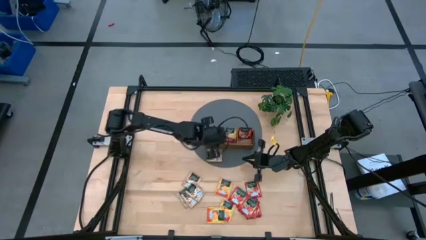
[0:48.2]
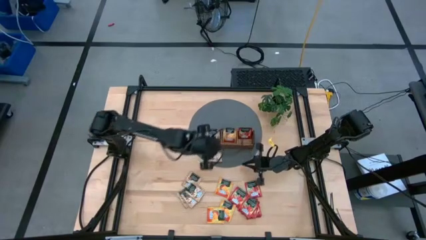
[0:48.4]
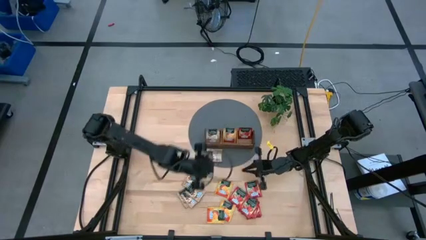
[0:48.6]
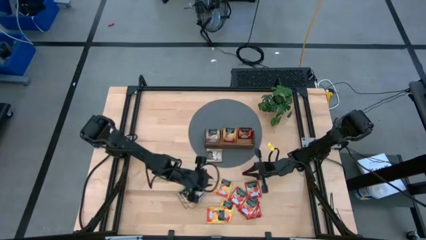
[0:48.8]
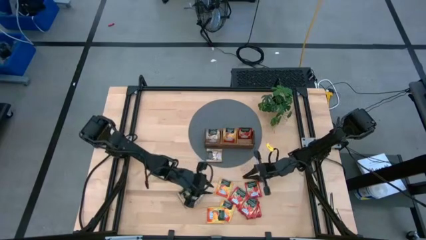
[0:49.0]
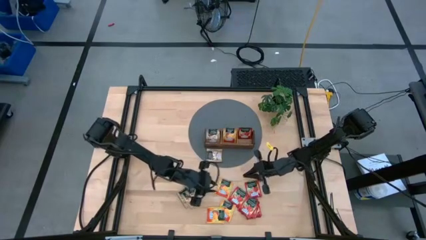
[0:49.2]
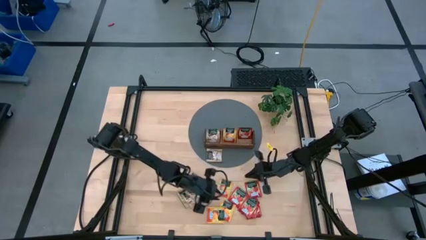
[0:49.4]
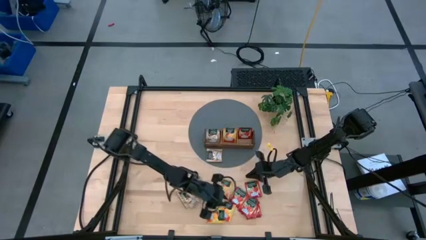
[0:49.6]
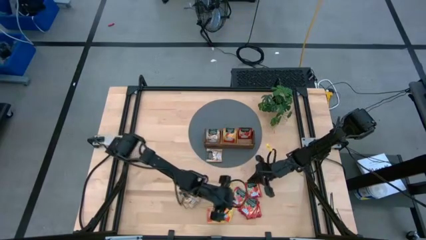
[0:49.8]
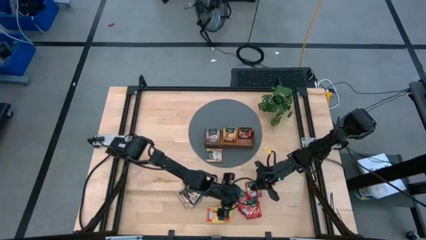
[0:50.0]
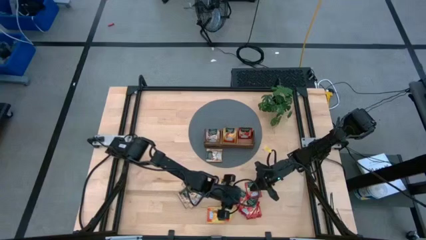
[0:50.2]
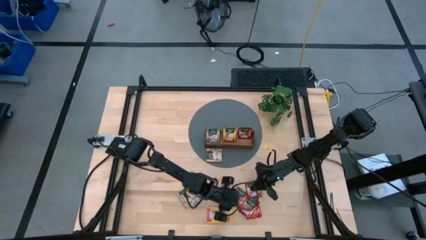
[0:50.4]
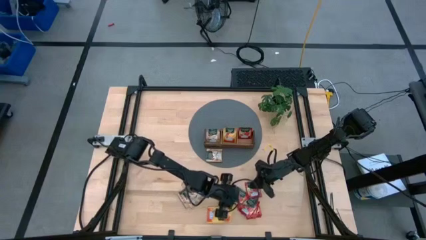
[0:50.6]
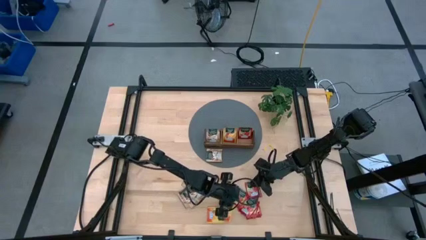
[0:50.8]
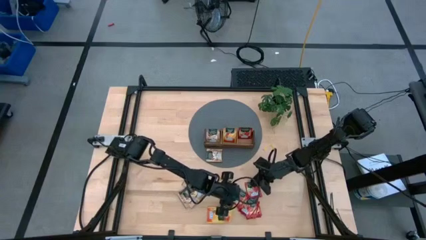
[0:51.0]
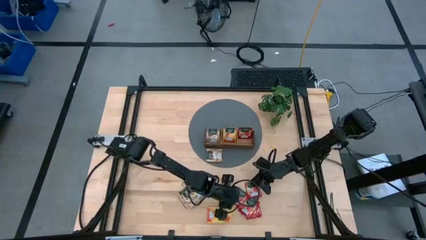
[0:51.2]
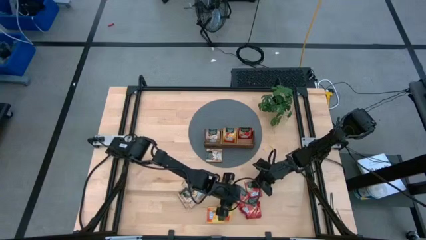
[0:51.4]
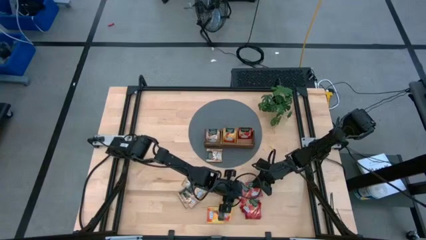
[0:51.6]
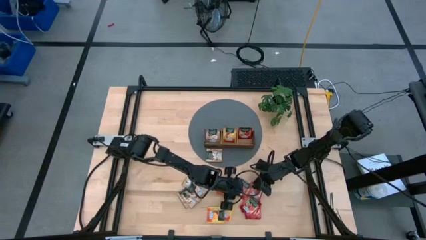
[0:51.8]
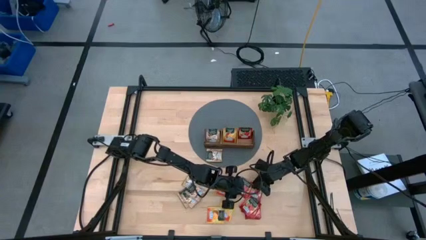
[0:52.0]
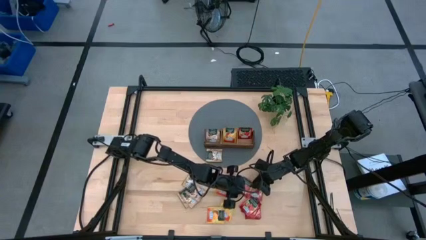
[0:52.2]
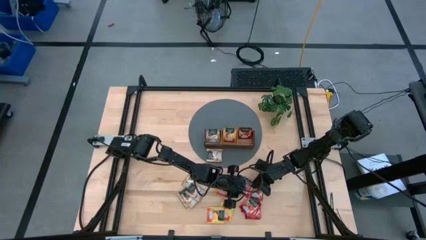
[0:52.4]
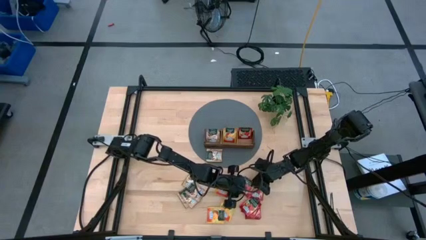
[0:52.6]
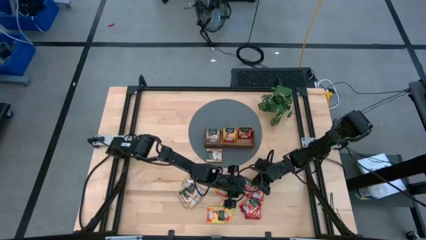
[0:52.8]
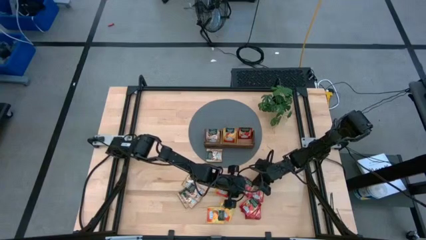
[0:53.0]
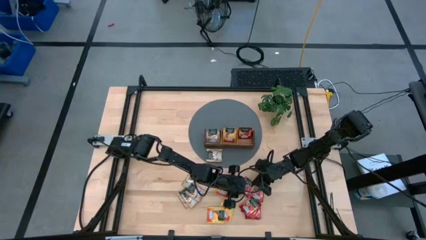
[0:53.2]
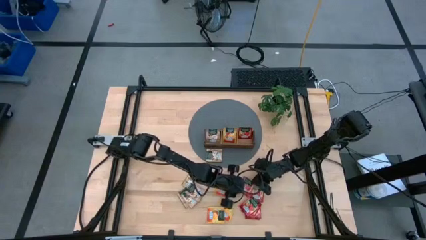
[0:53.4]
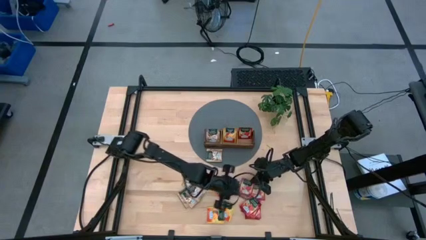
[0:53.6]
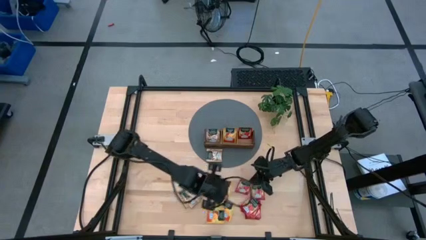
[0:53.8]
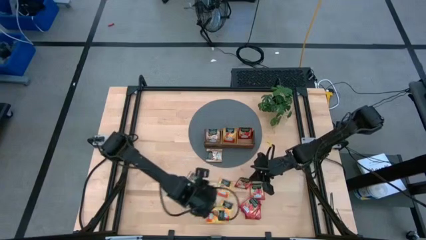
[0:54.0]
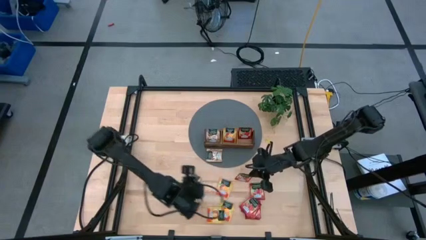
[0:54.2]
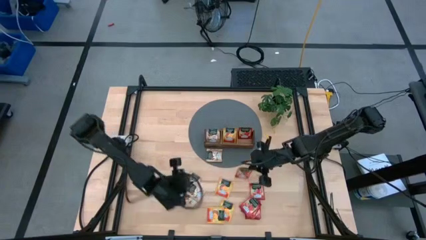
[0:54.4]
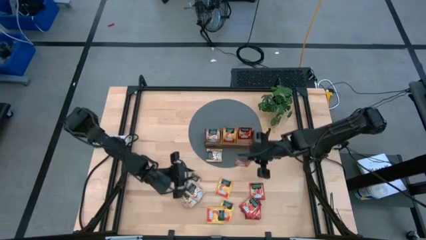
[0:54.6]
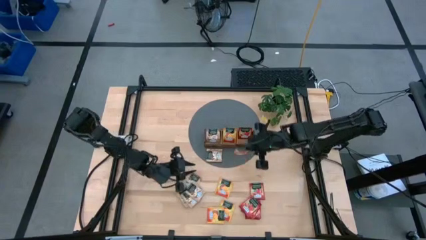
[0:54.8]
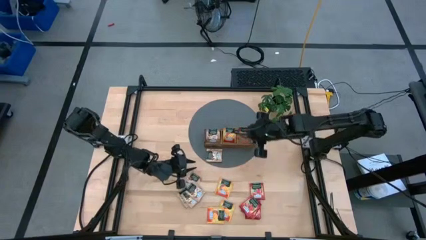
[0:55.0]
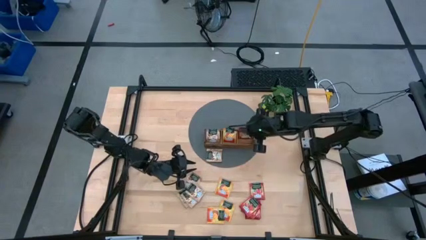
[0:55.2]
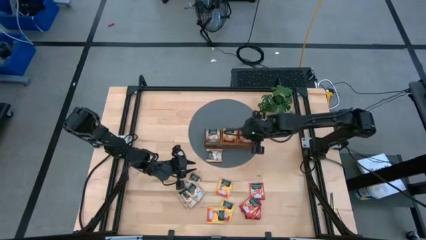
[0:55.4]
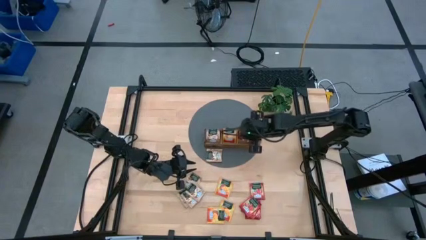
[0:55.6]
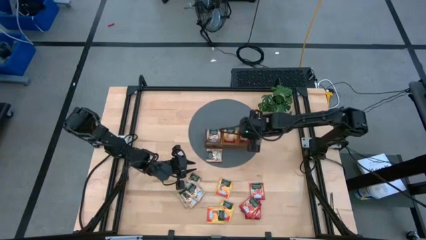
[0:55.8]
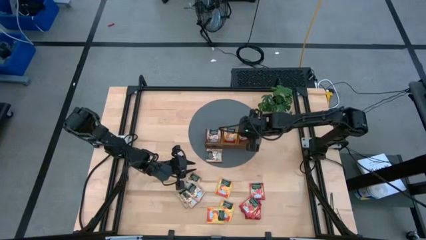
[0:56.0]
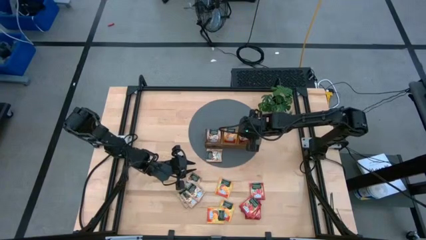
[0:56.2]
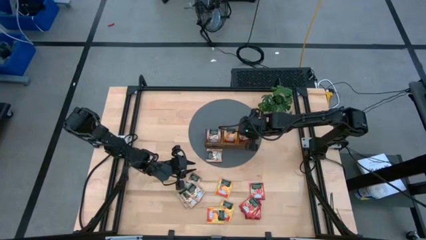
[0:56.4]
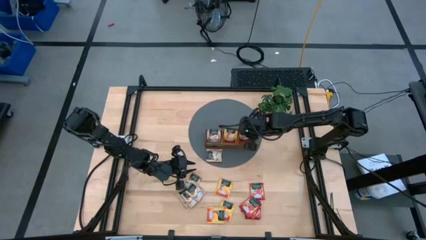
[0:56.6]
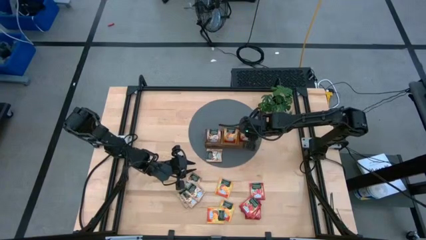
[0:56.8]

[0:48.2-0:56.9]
Task: Pick & Place Tea
Put the red tea packet into the right section of the wooden organizer

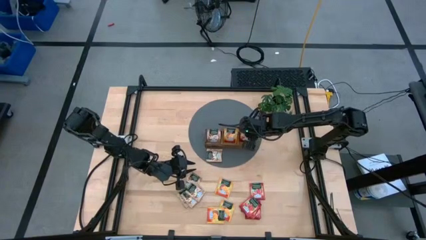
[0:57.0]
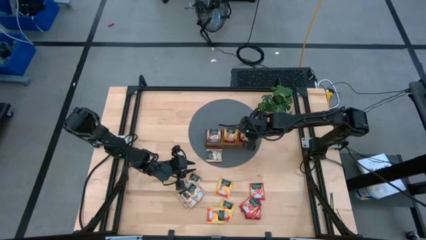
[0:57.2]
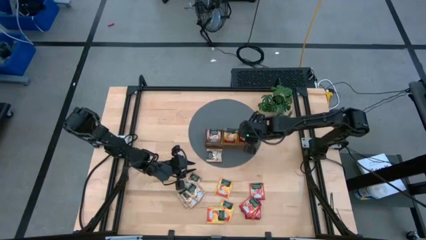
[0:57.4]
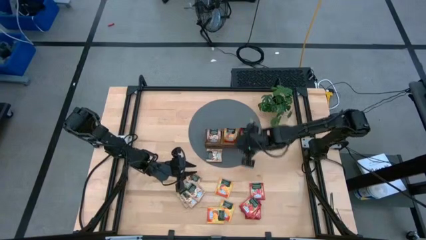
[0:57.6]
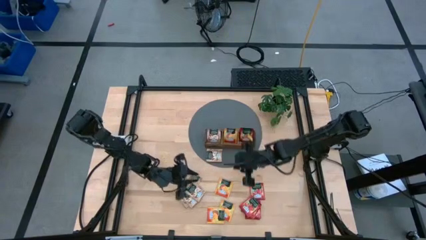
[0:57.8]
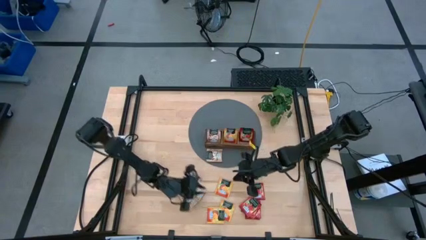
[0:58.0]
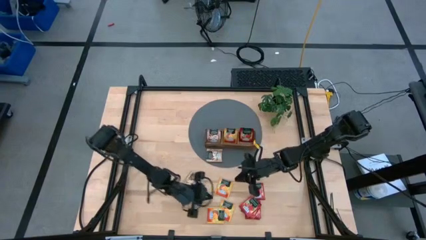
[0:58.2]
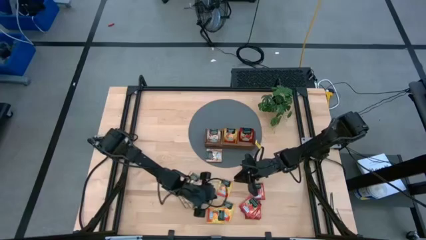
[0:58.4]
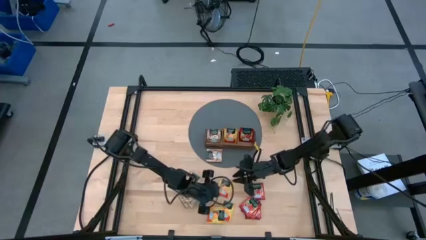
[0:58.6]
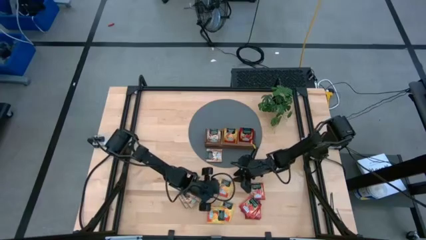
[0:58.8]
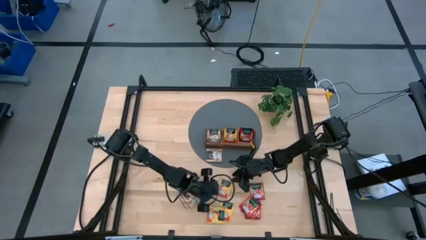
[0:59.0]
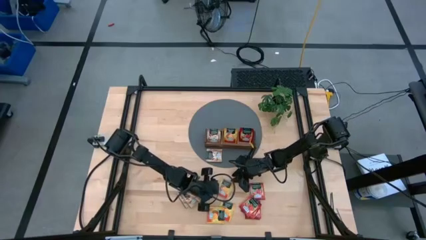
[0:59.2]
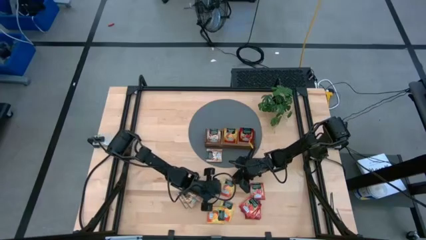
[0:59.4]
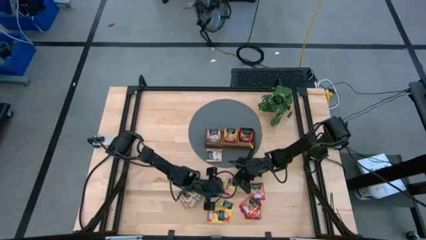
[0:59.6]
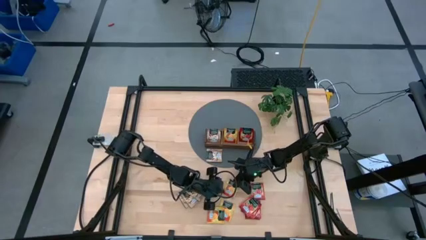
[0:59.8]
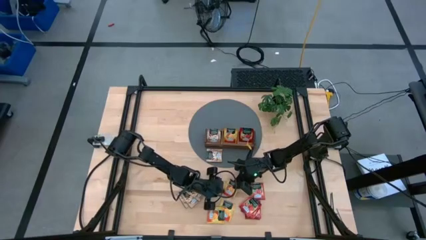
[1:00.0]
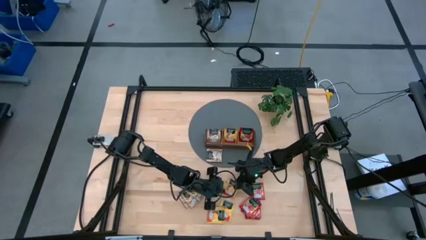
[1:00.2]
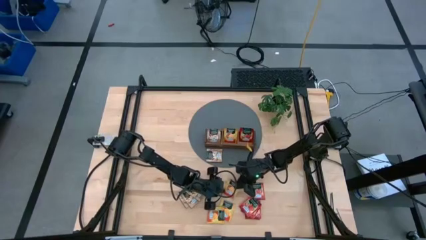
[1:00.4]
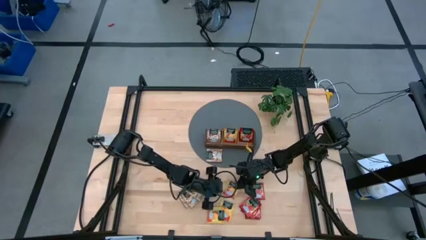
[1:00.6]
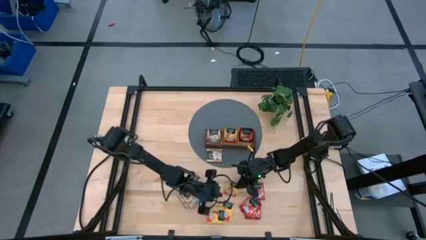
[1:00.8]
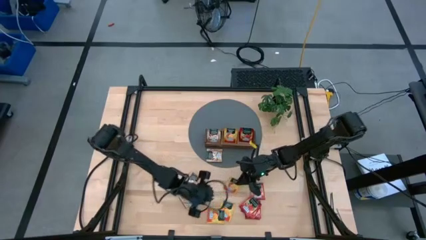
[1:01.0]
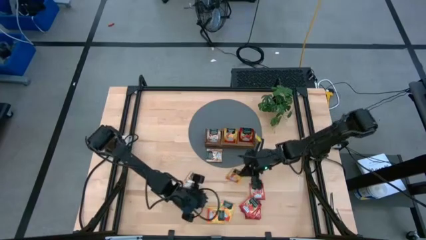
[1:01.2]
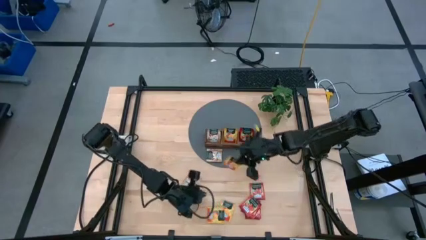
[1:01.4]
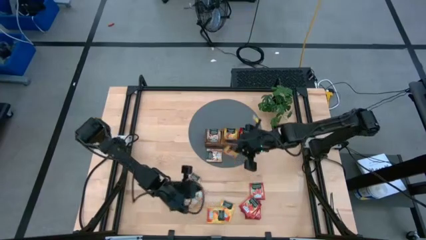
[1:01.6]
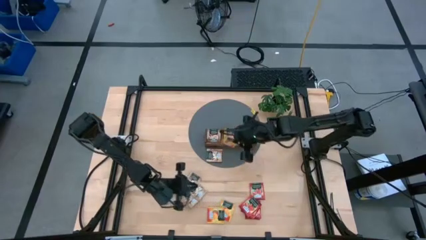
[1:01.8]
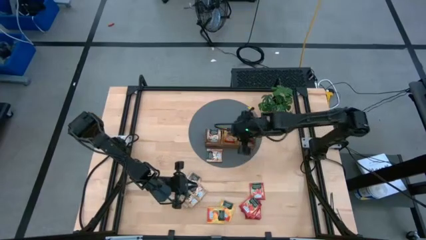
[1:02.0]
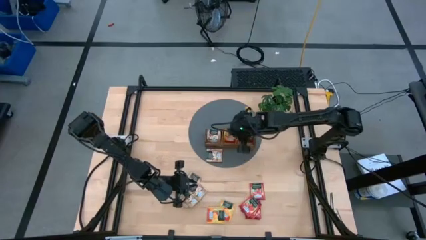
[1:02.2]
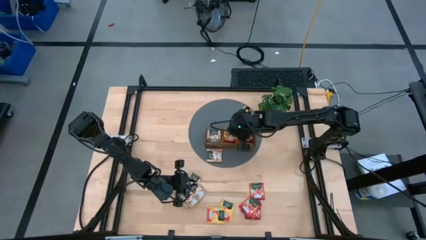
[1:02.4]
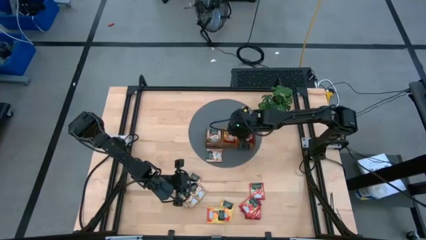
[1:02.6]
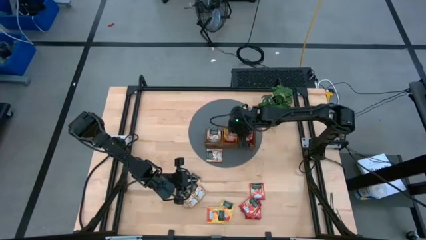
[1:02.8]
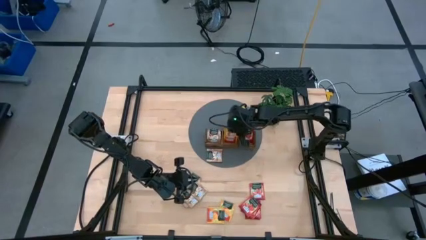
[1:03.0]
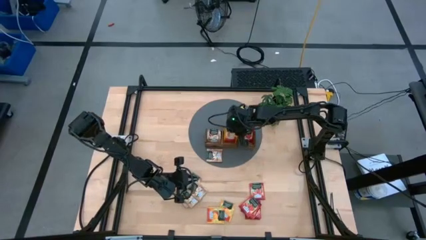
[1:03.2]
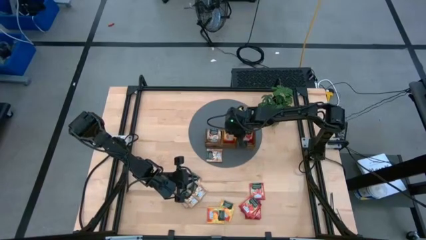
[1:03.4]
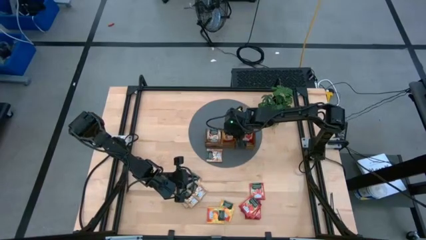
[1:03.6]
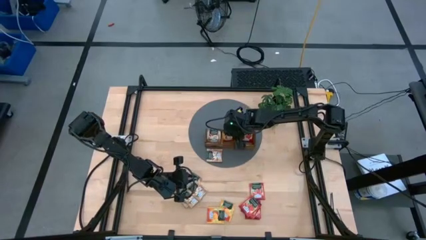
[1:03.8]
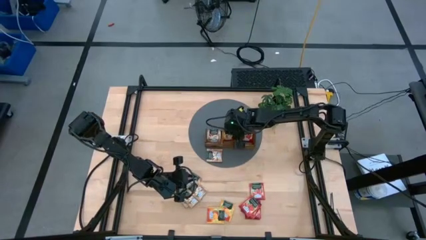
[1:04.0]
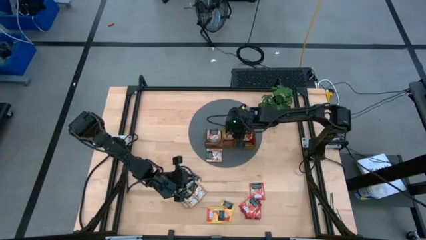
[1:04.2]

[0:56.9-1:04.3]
Put the top orange tea packet into the middle section of the wooden organizer
